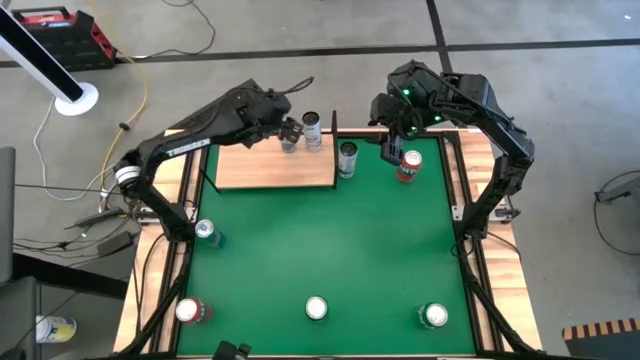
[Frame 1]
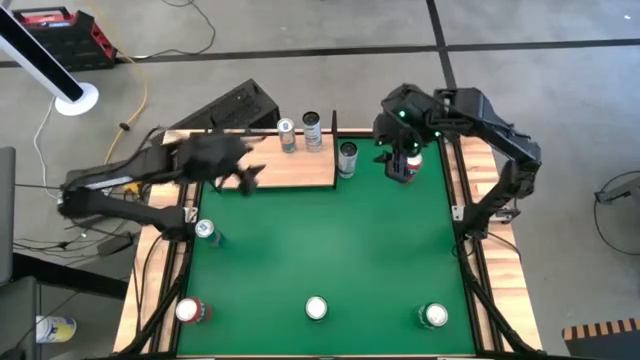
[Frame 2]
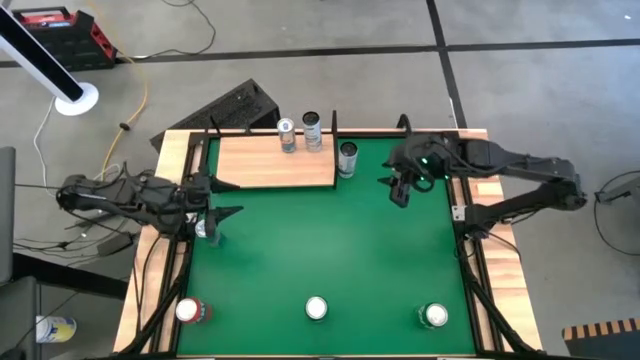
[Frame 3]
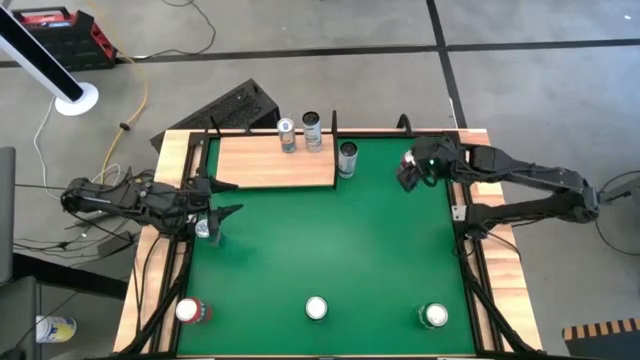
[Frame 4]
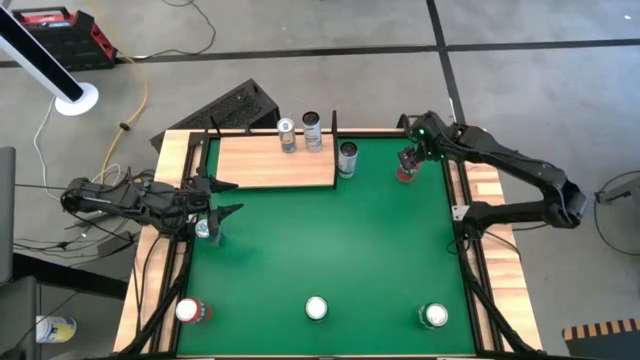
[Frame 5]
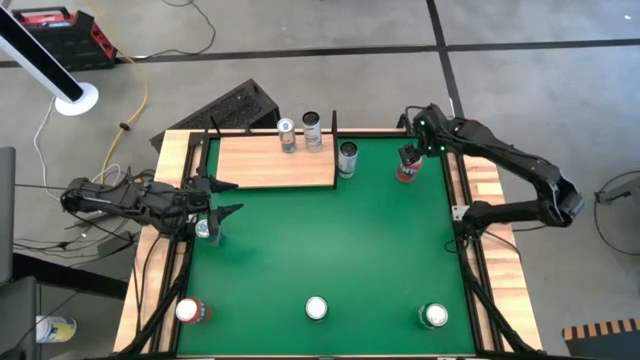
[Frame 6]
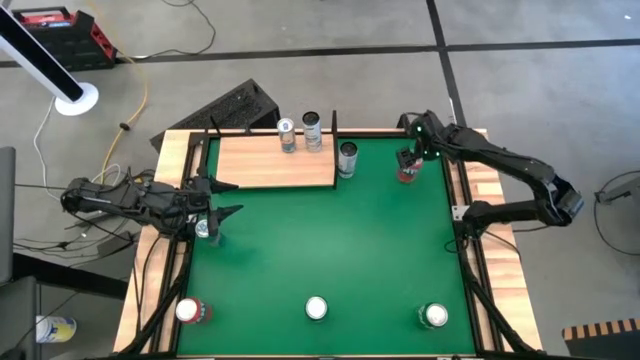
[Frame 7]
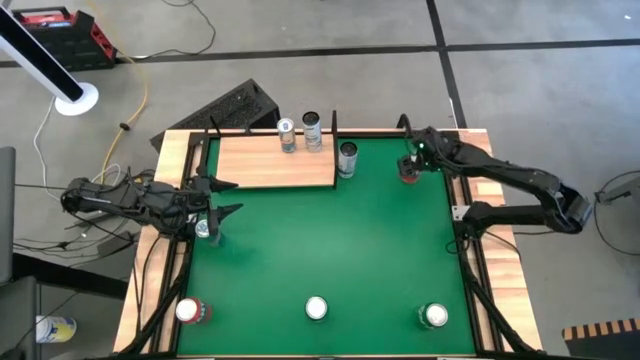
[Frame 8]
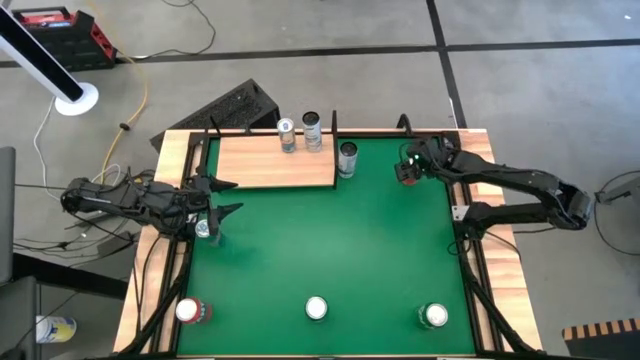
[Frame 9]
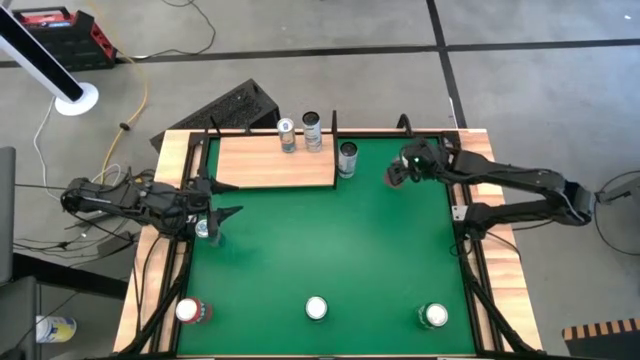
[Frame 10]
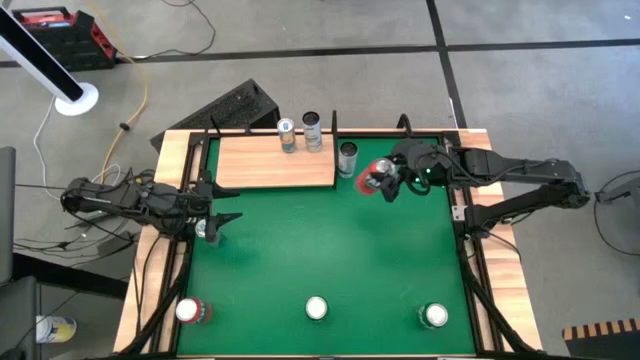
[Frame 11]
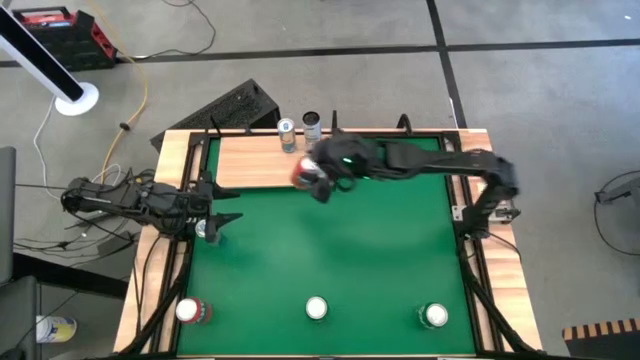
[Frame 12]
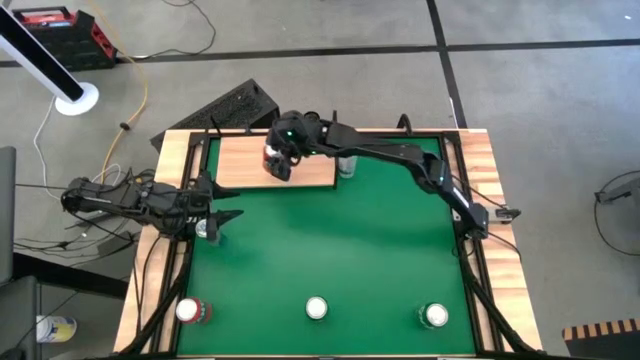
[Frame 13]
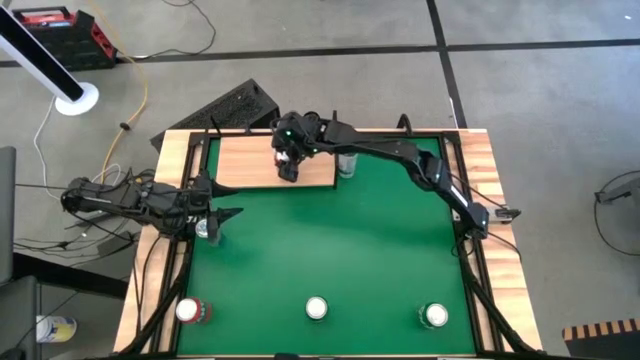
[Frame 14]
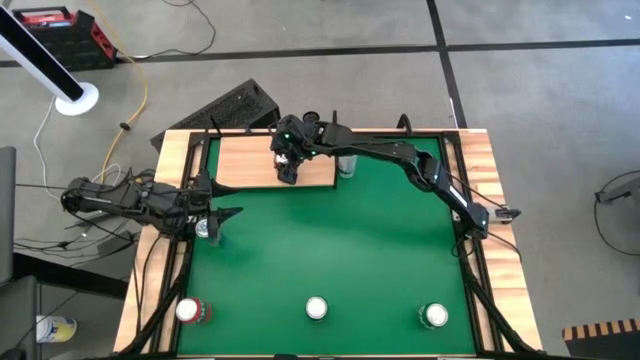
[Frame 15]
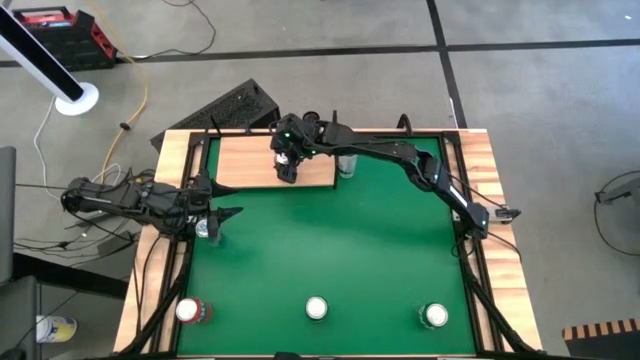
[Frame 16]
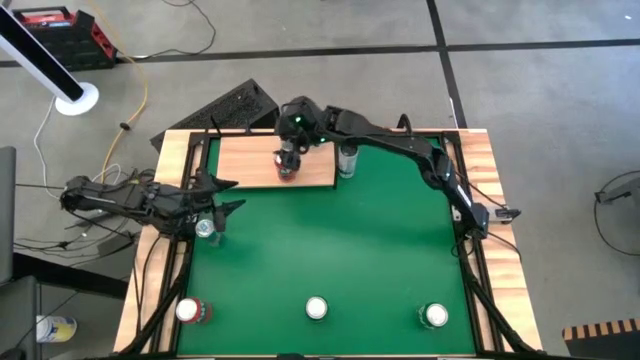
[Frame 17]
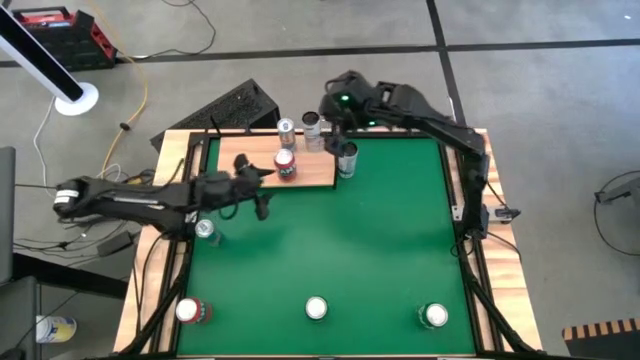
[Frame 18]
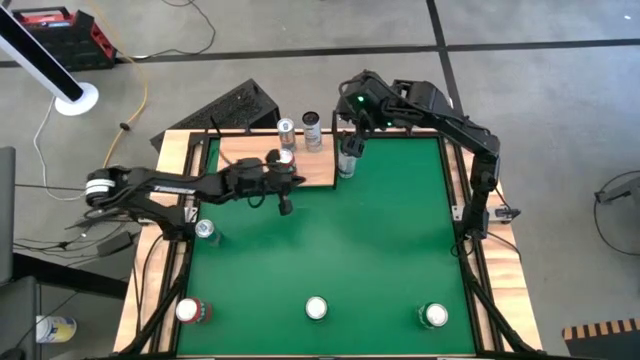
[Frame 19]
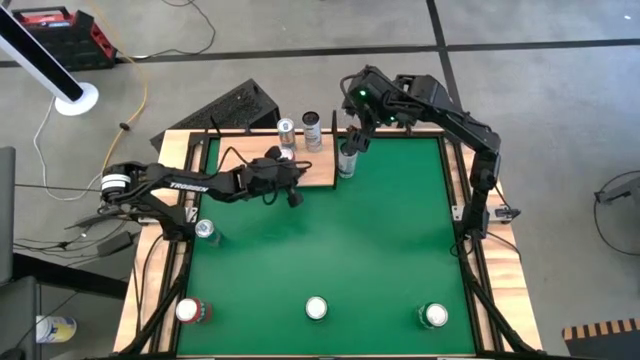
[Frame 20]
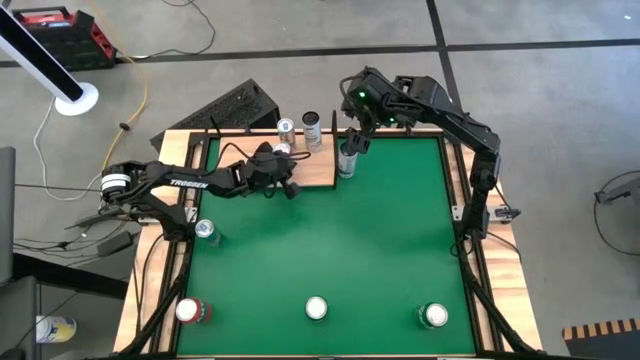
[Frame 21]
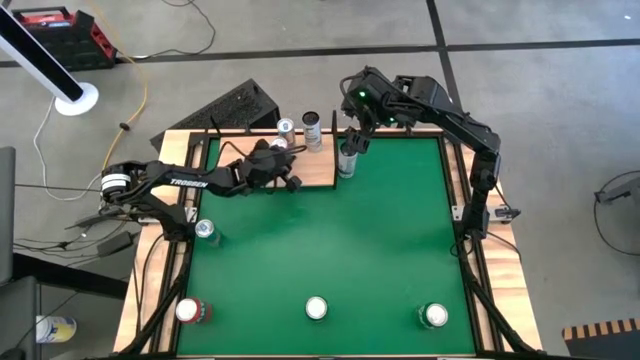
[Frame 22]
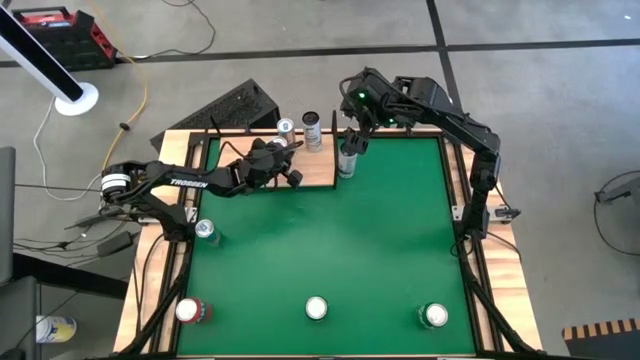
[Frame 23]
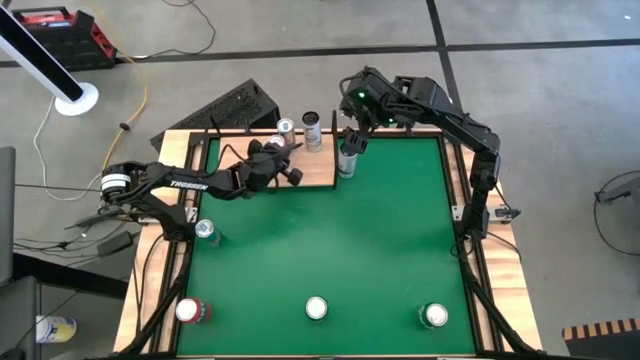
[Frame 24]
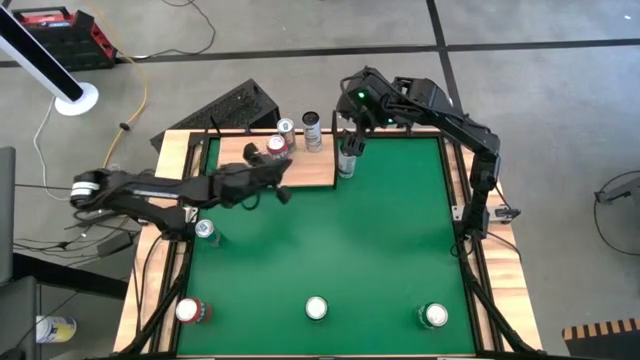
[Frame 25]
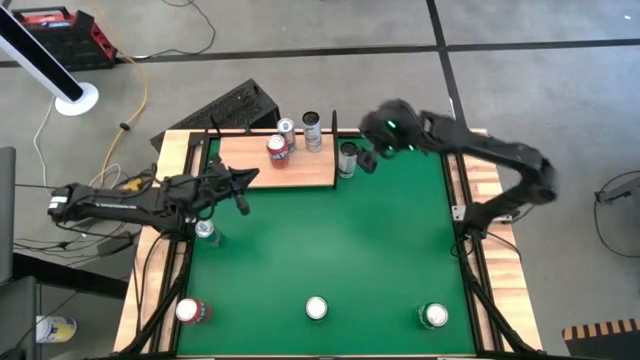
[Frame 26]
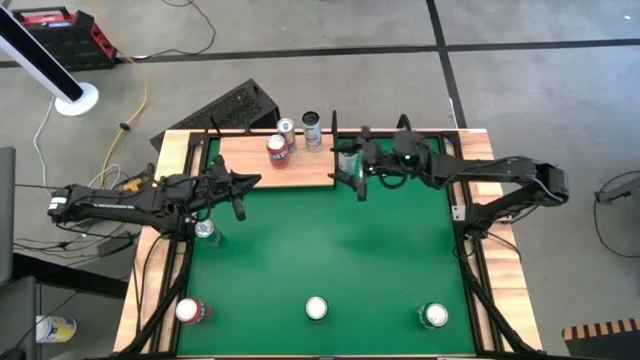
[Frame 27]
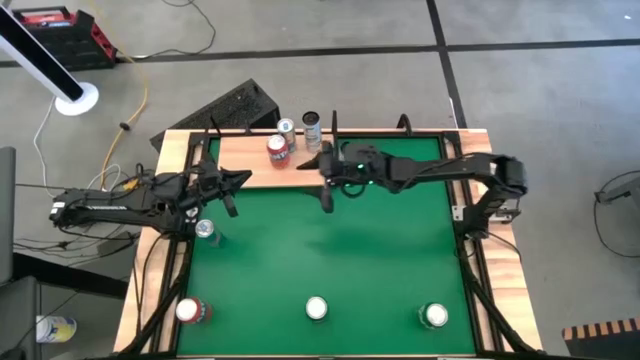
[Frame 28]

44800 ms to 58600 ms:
Task: Place canned beverage on shelf
Put the top red soda can on the shelf

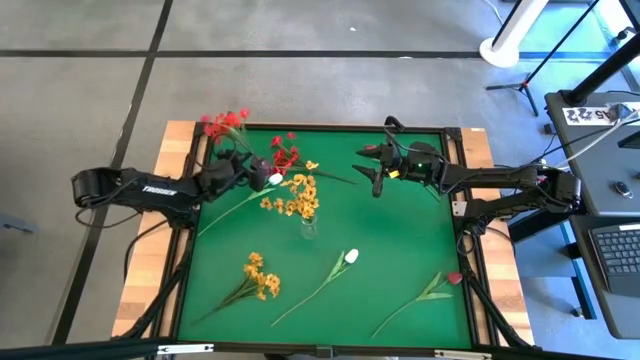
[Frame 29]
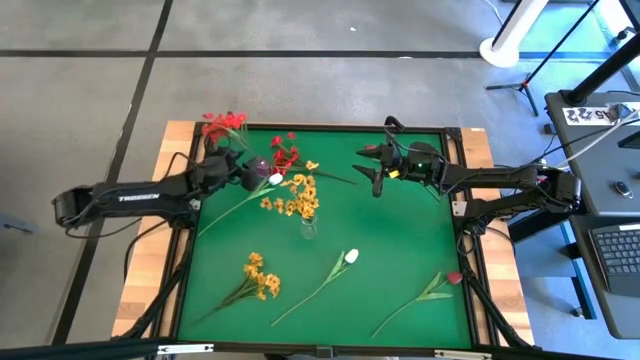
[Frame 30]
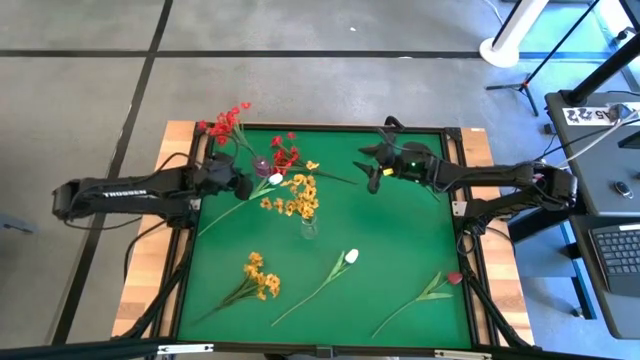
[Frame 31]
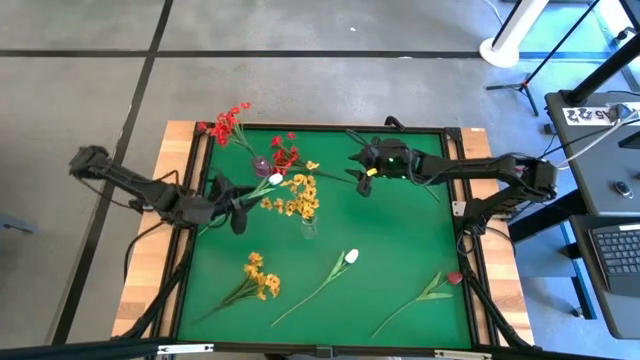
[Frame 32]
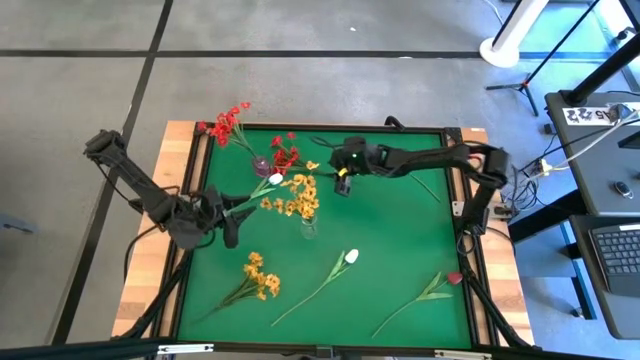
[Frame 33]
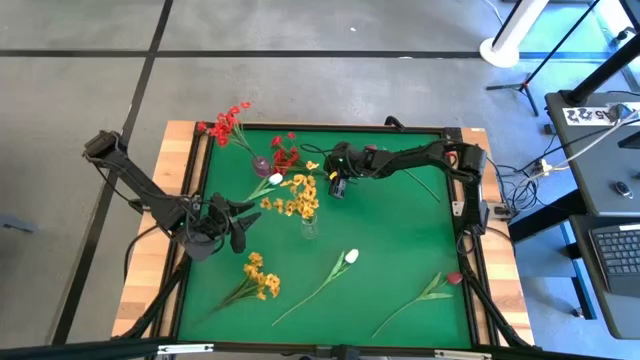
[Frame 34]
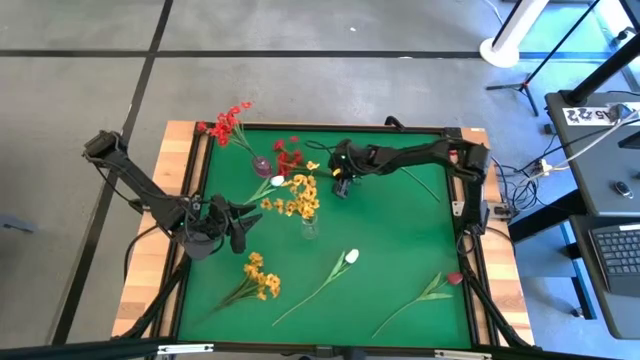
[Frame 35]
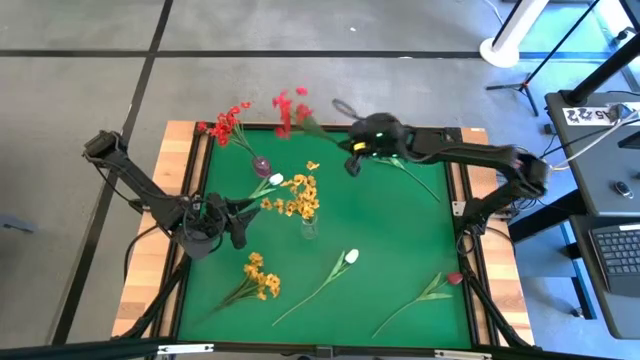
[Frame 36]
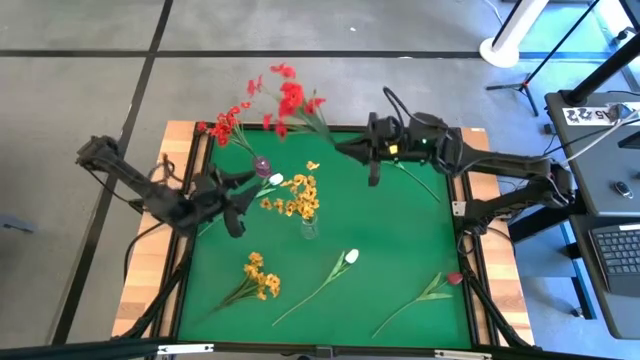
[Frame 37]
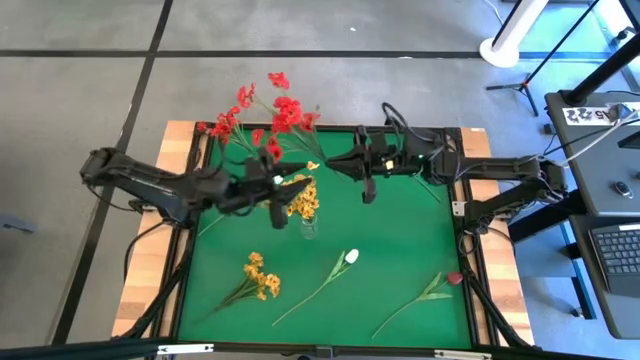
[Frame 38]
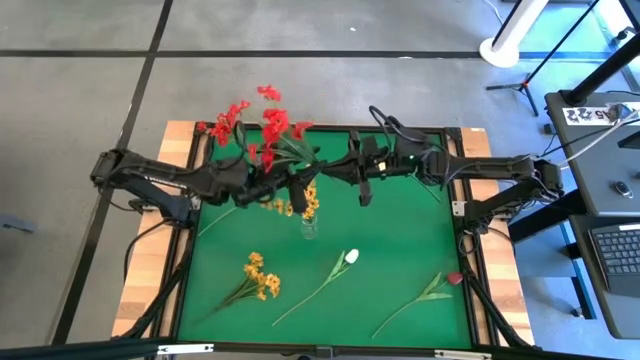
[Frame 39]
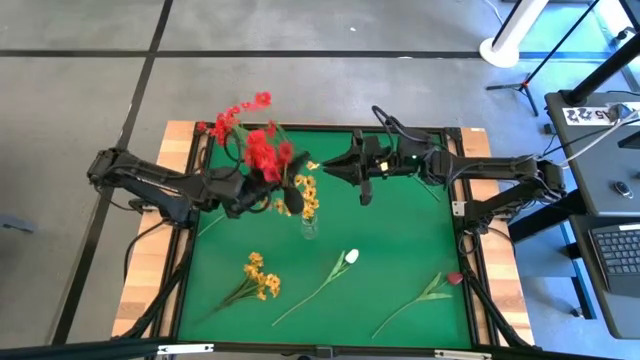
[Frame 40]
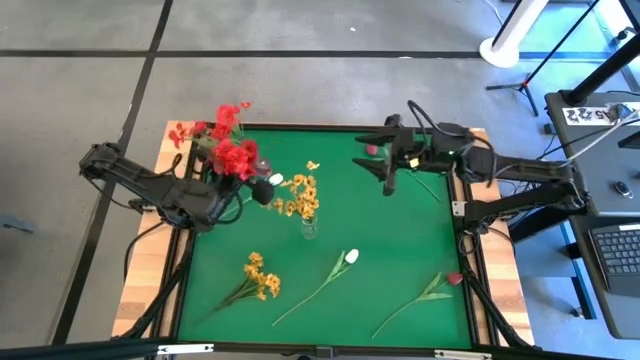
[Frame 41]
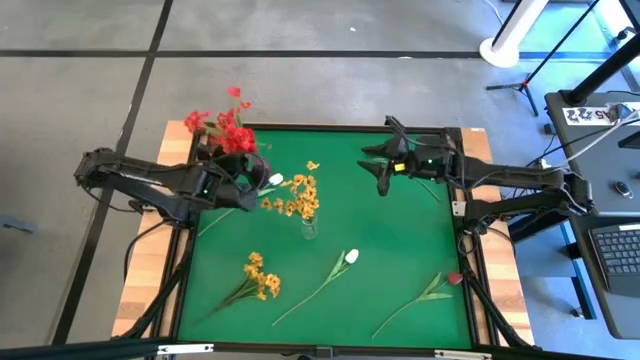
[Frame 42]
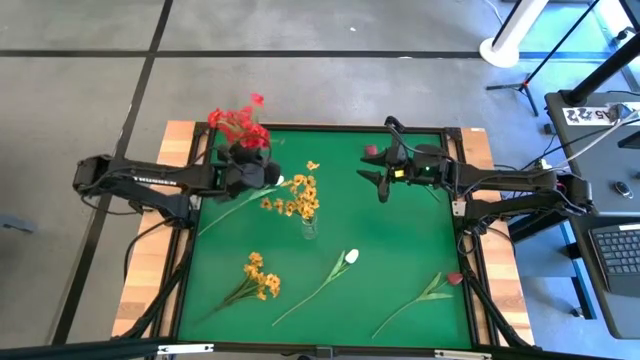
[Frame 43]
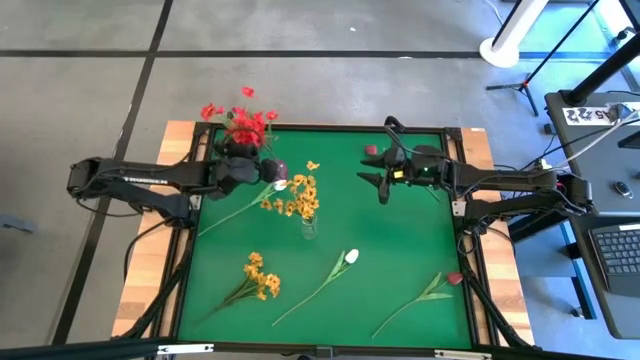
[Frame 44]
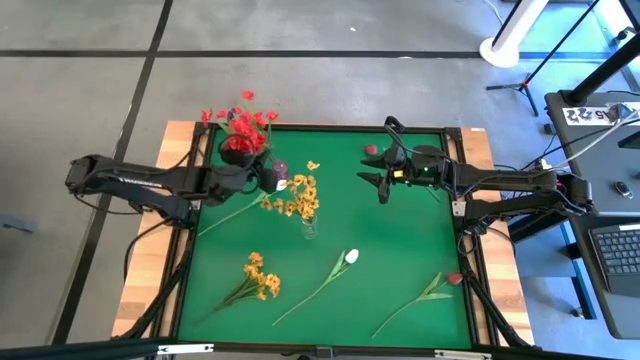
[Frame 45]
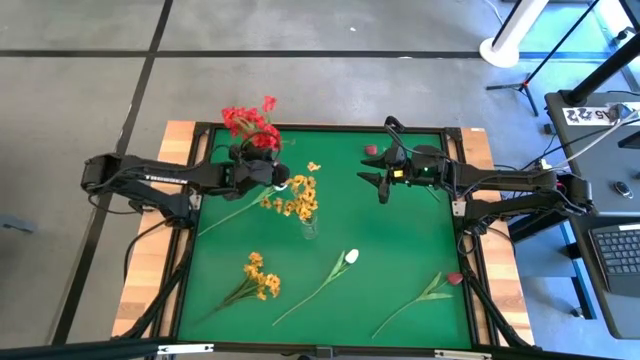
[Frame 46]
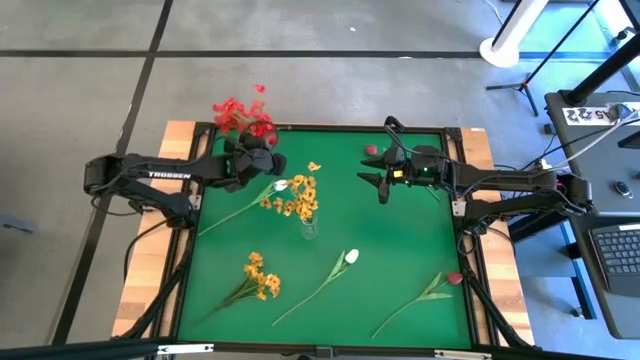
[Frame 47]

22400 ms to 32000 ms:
Task: Sort flowers into vase by color
Put the red flowers into the violet vase
